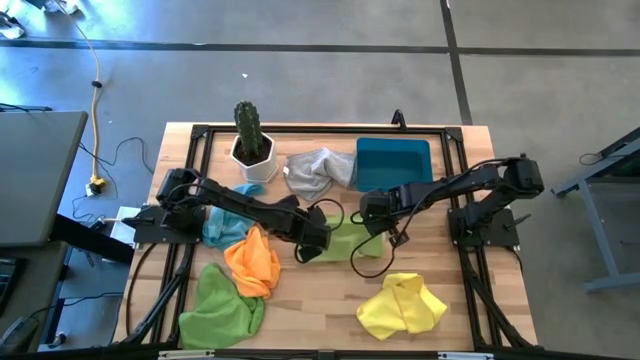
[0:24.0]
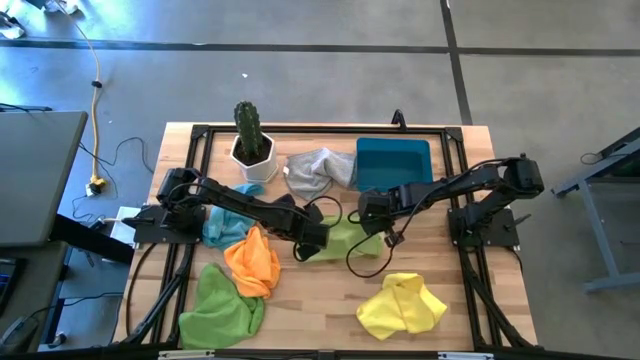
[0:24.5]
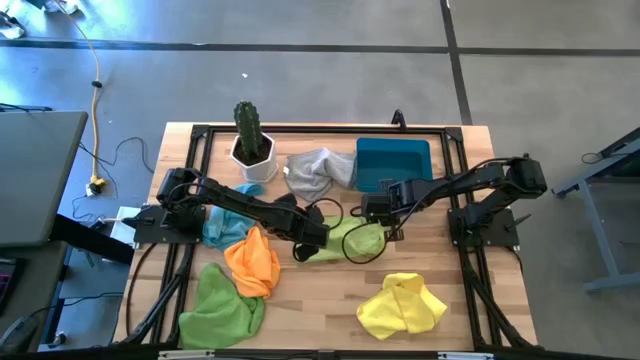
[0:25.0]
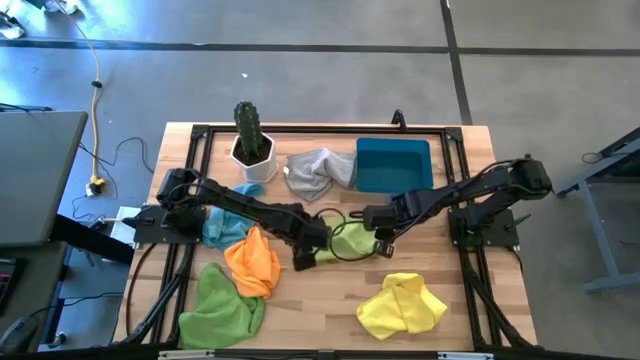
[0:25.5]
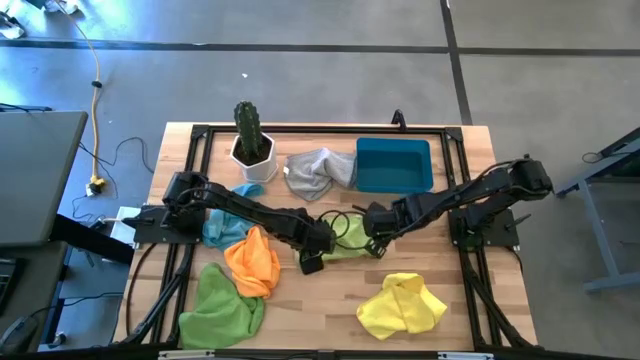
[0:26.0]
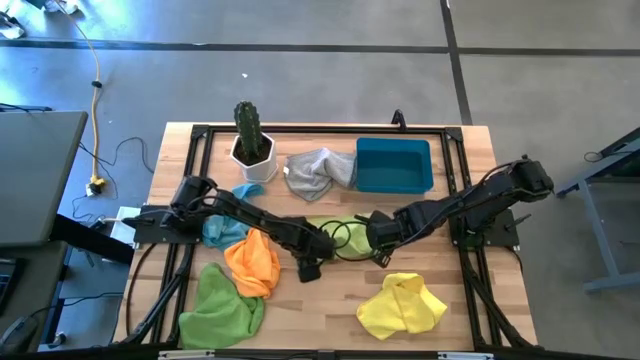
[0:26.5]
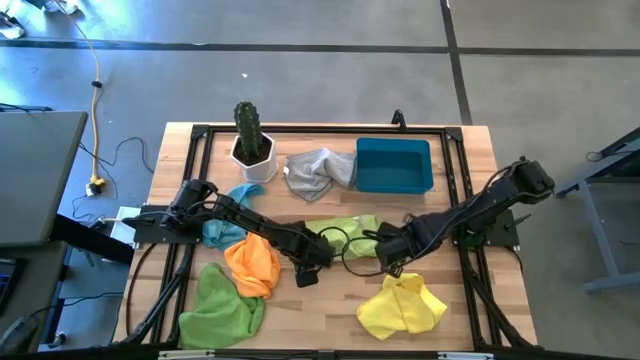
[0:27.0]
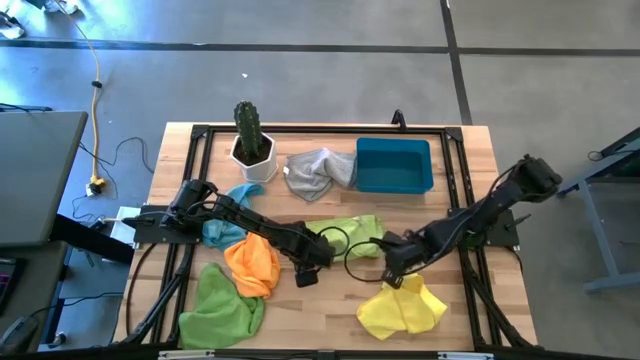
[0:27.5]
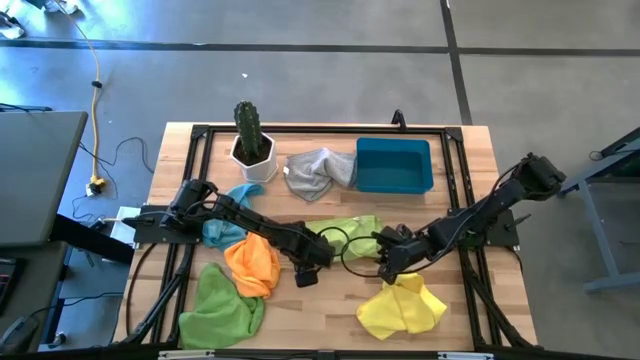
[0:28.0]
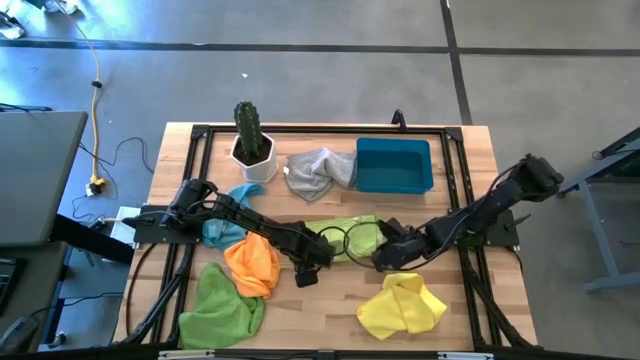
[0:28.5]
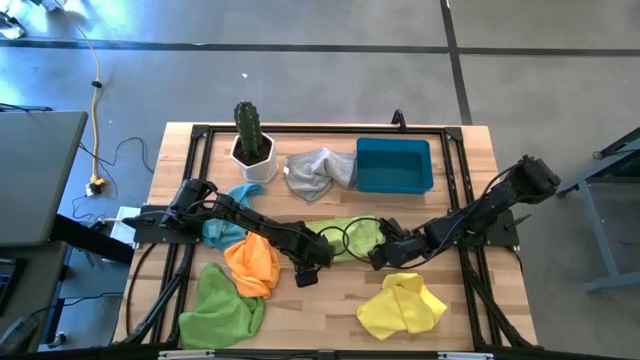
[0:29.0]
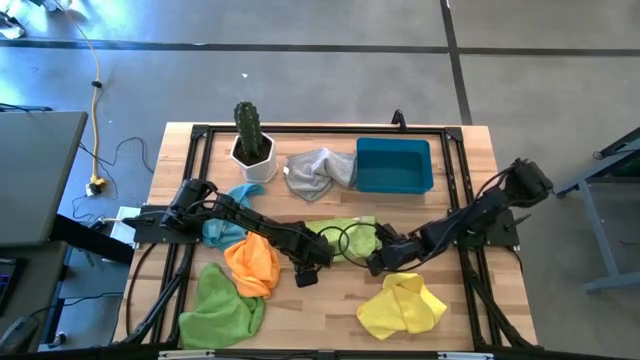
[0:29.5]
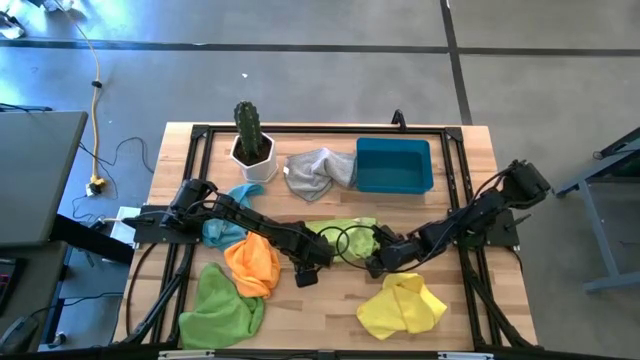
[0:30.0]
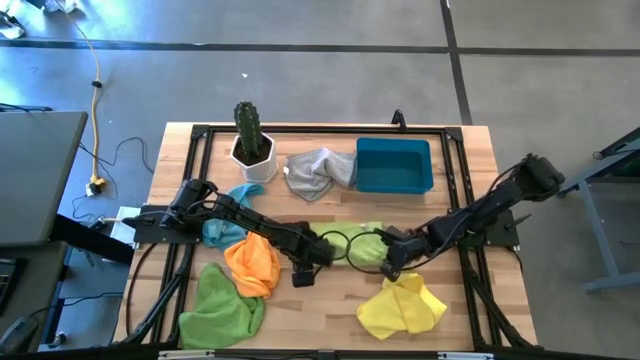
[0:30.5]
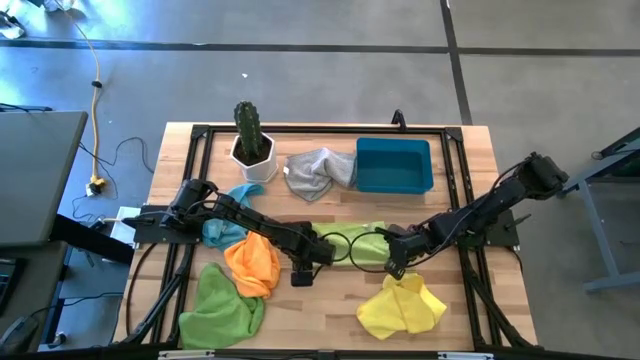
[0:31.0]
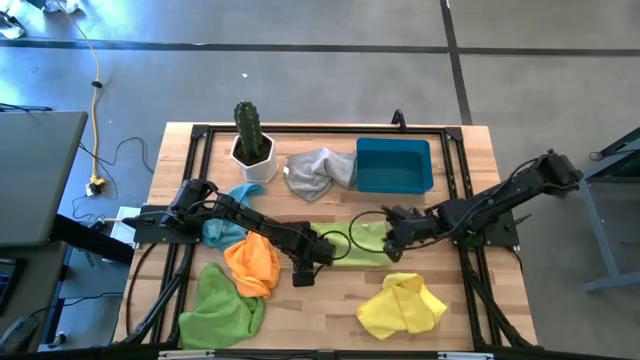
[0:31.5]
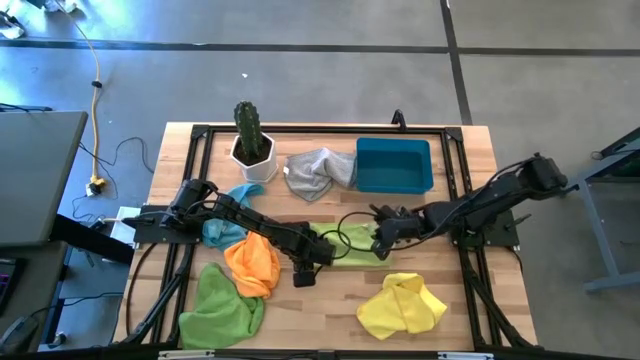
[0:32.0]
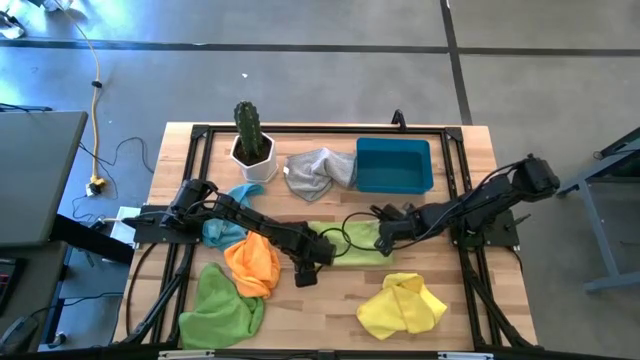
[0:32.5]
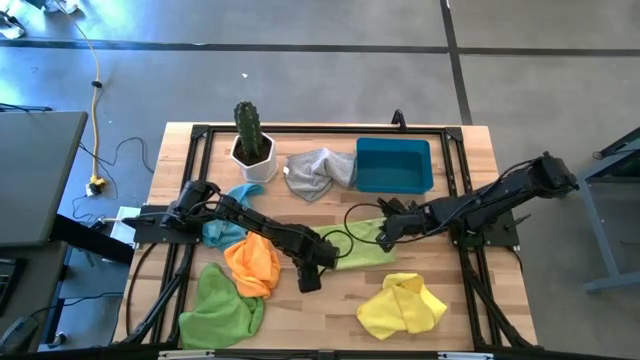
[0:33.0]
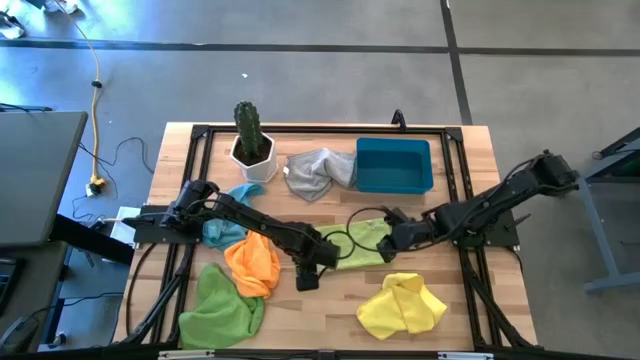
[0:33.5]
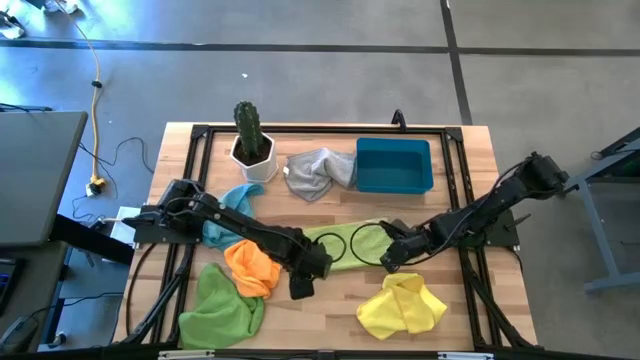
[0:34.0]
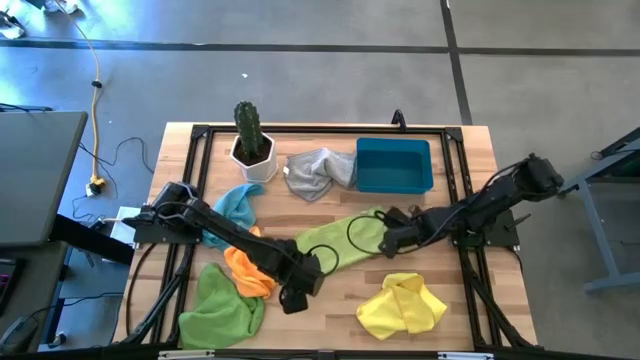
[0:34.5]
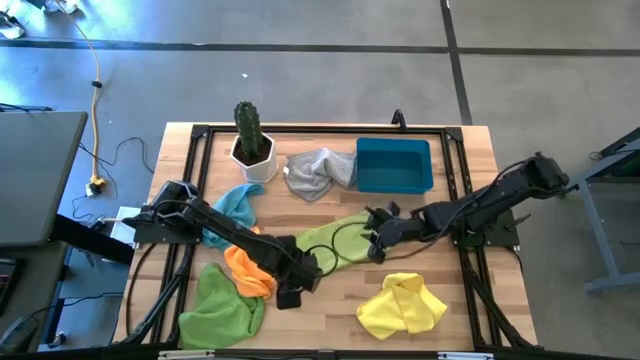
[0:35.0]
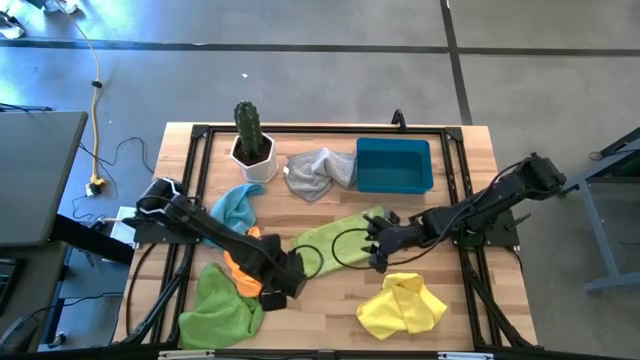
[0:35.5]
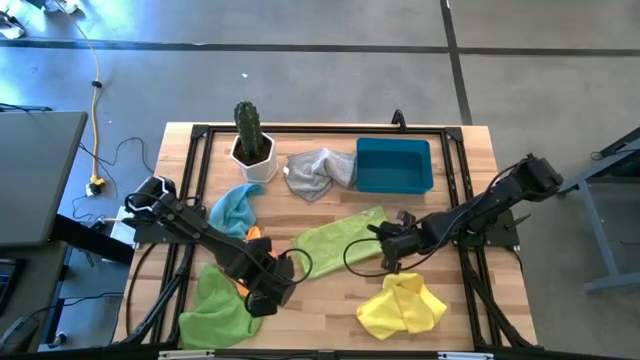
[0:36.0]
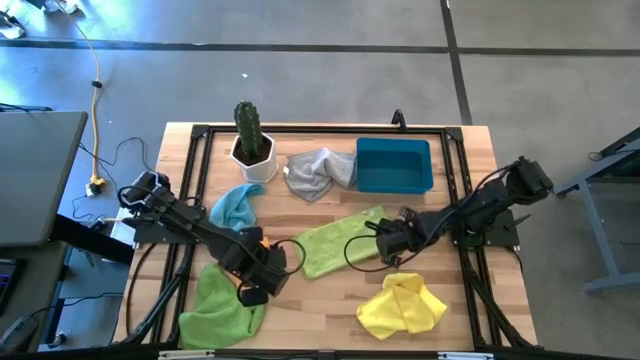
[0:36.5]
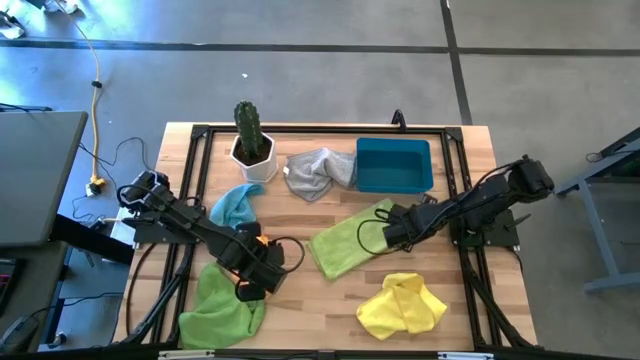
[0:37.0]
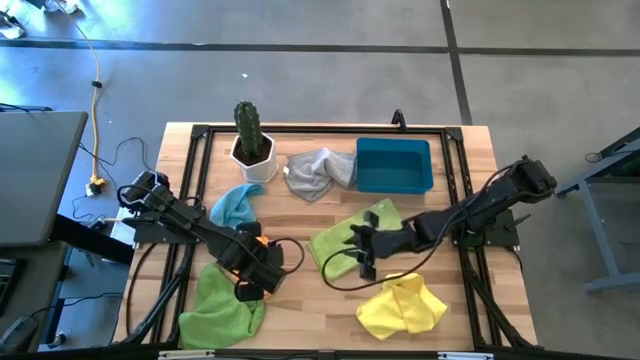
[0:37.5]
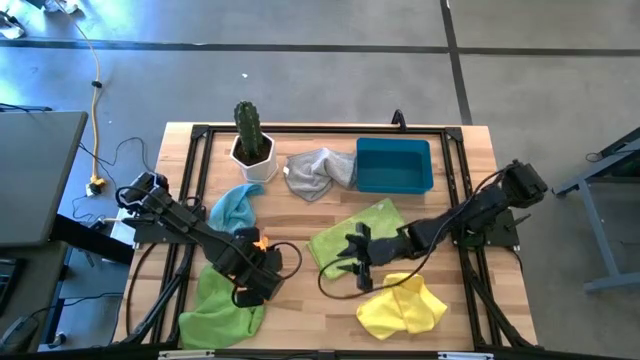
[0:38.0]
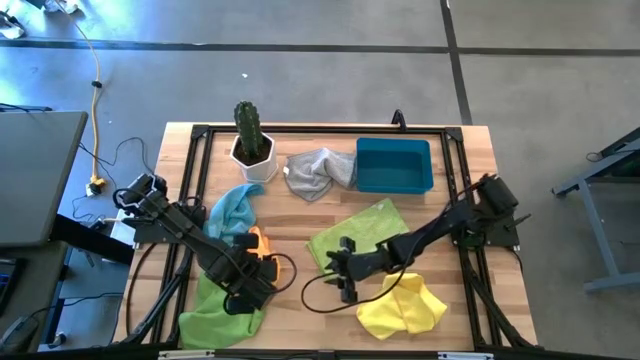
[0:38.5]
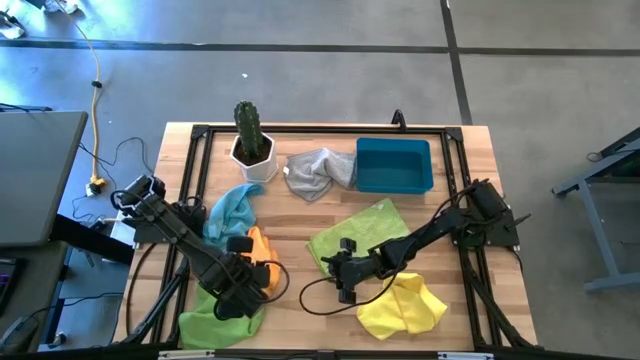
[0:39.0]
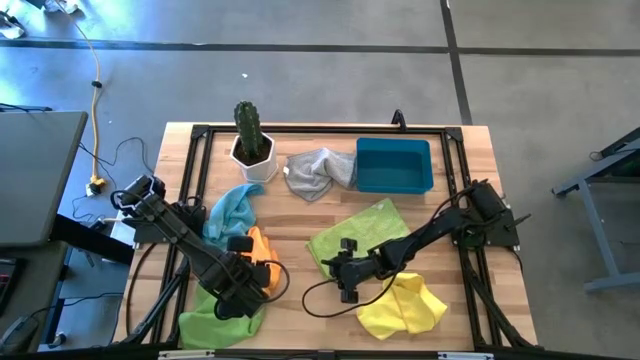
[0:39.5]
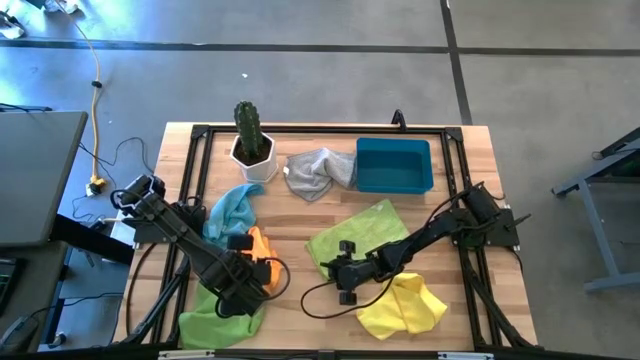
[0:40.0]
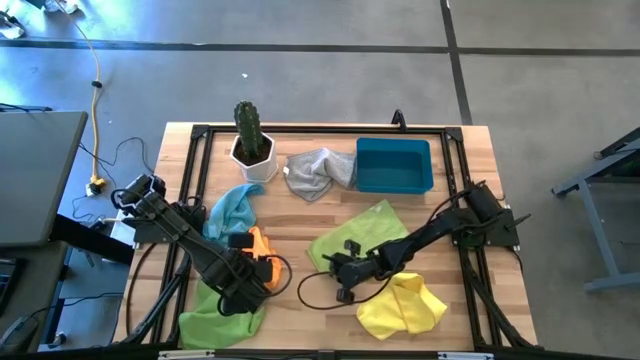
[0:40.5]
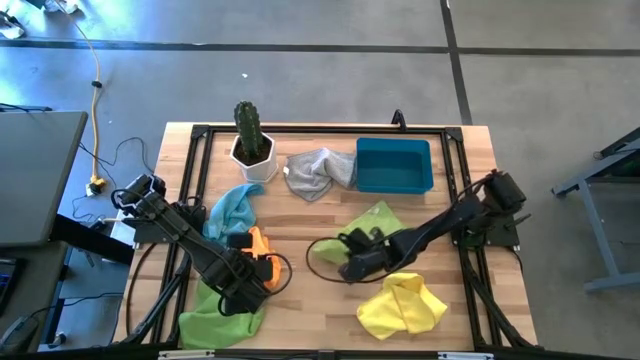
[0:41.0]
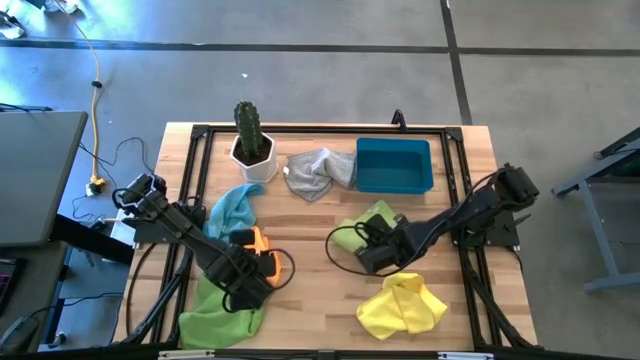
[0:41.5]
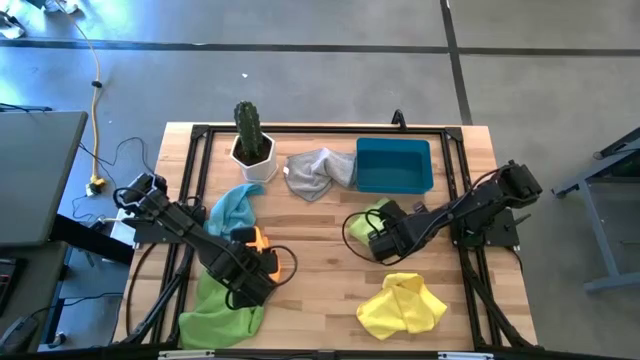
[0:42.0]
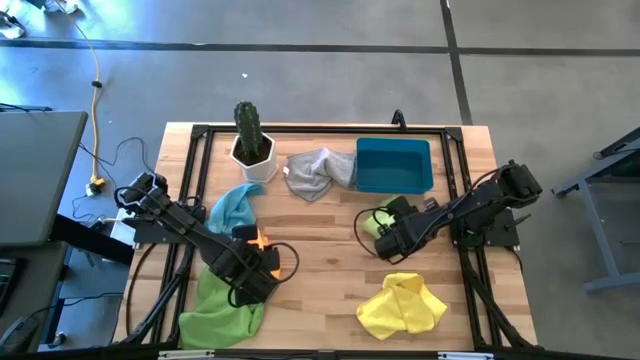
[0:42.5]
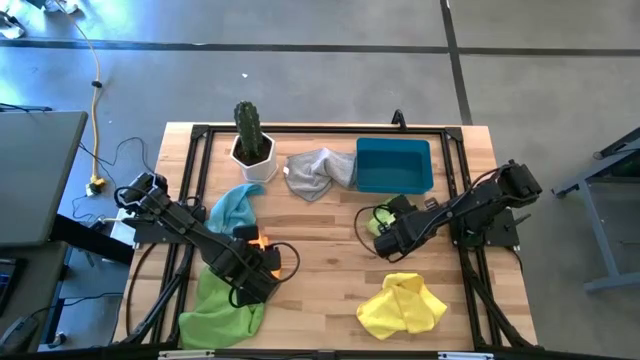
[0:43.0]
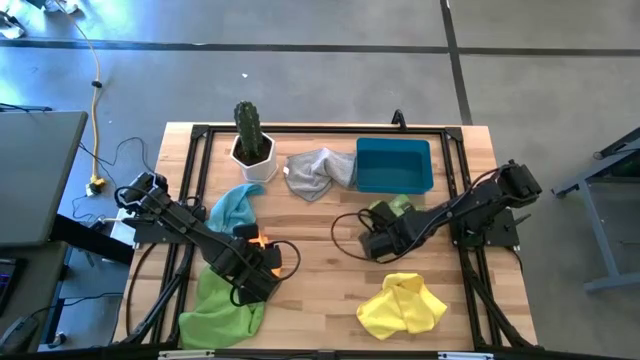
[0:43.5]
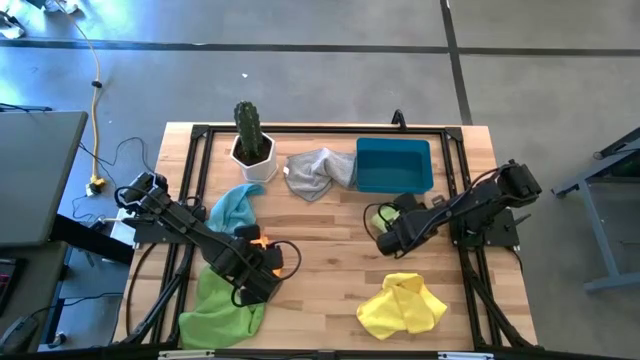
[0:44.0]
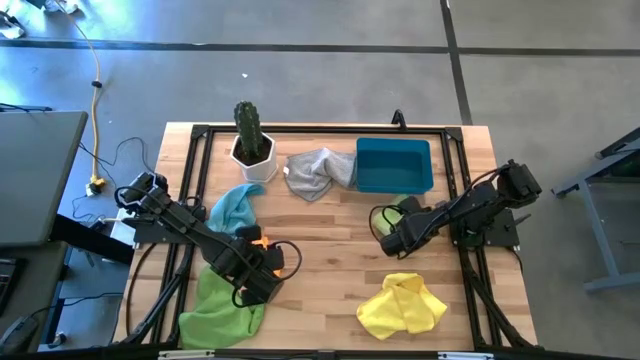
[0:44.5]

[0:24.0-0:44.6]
Task: Fold microfiber towels
Fold the light green microfiber cloth
